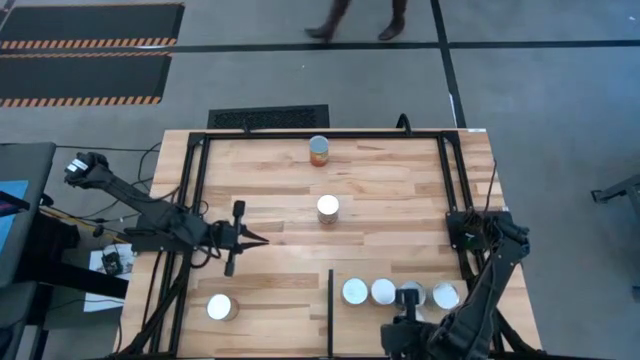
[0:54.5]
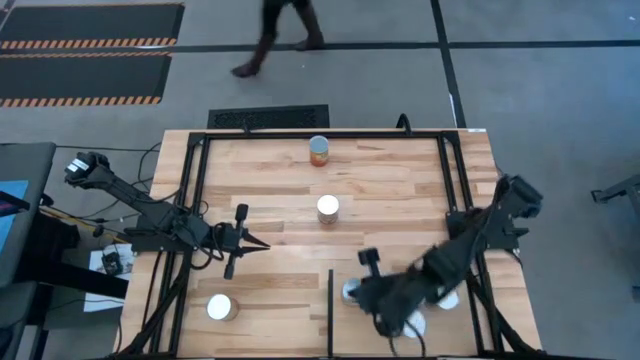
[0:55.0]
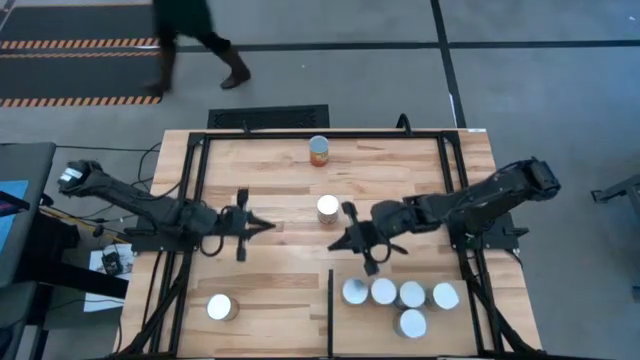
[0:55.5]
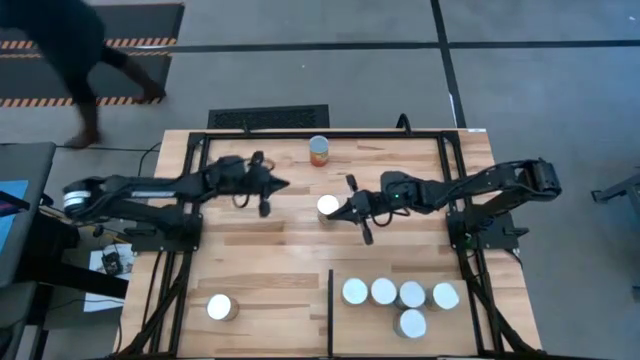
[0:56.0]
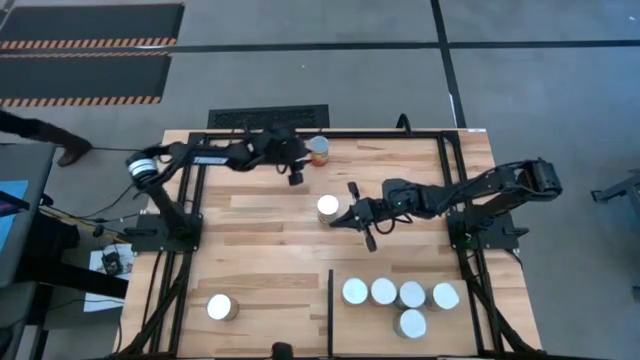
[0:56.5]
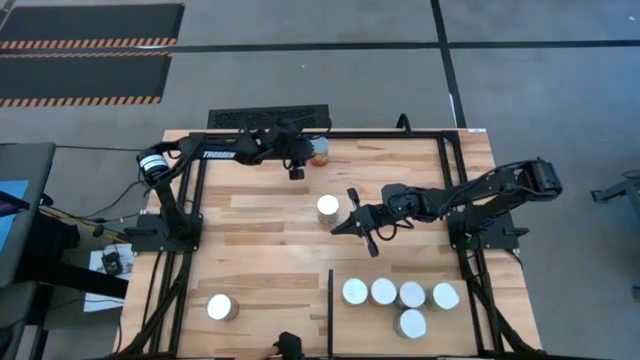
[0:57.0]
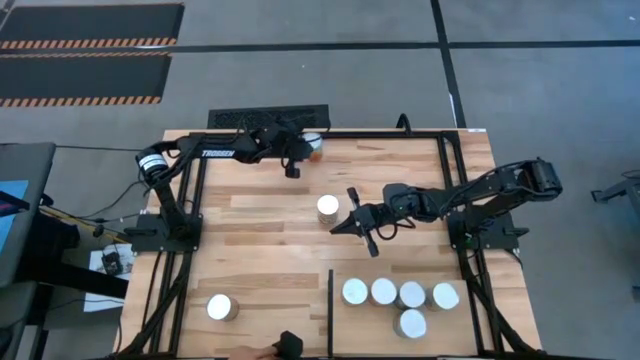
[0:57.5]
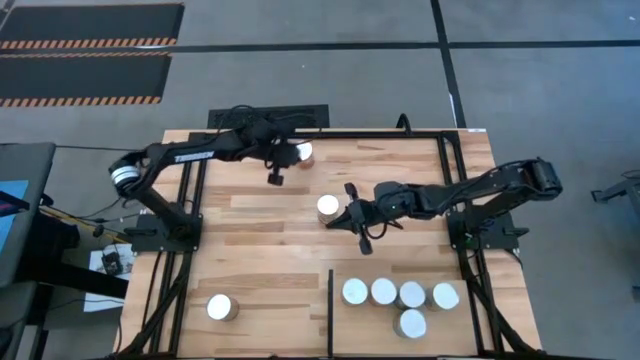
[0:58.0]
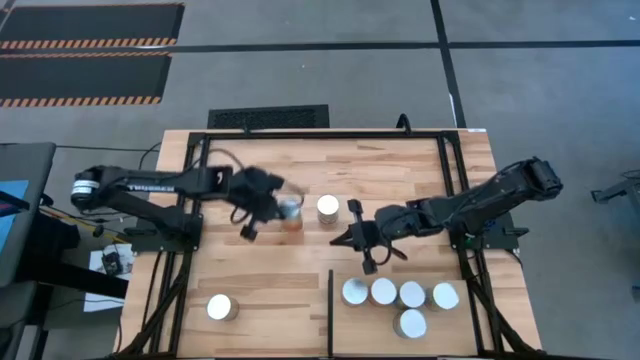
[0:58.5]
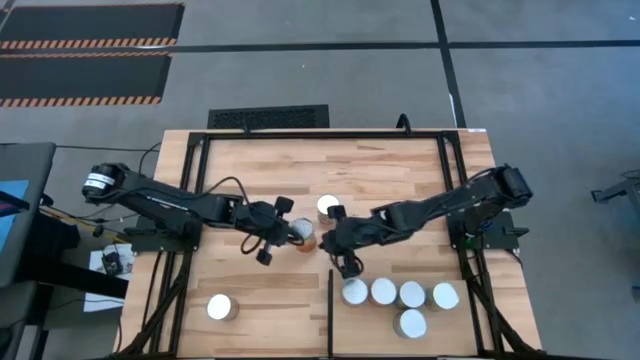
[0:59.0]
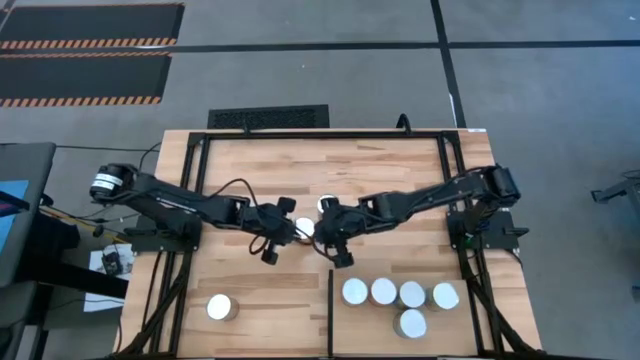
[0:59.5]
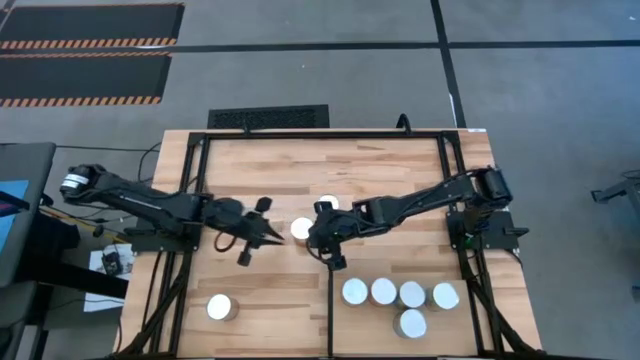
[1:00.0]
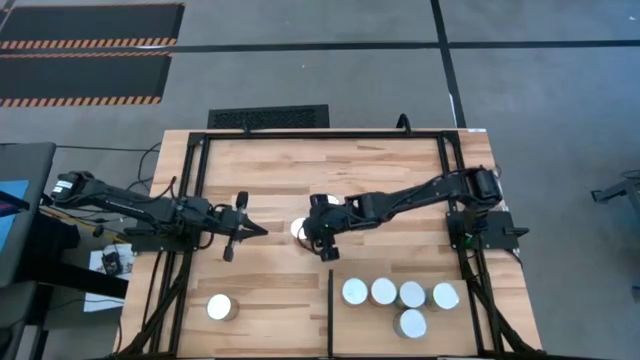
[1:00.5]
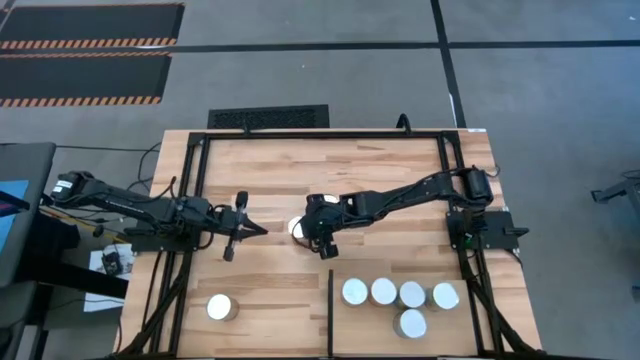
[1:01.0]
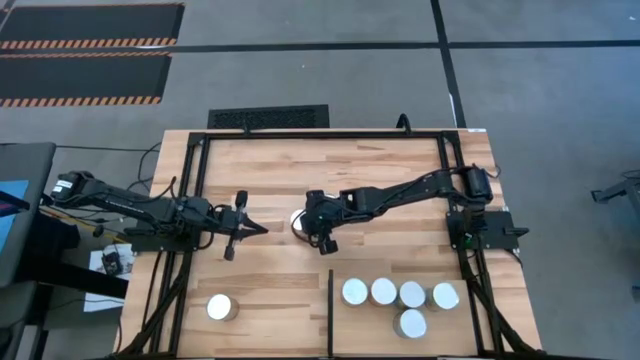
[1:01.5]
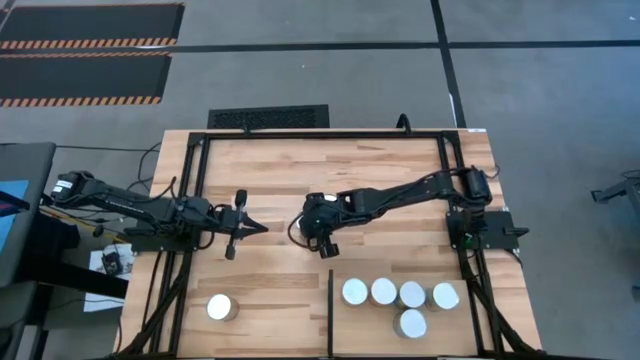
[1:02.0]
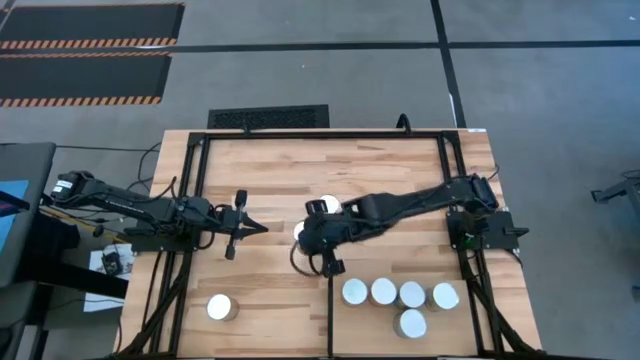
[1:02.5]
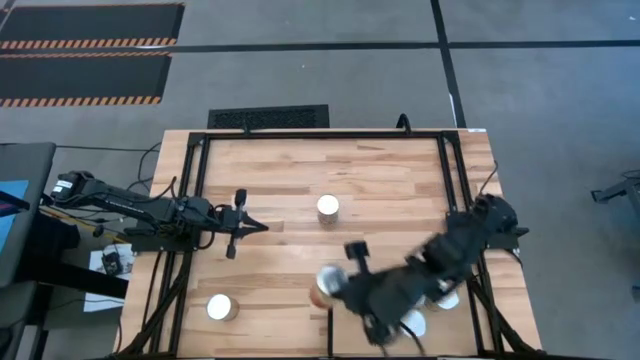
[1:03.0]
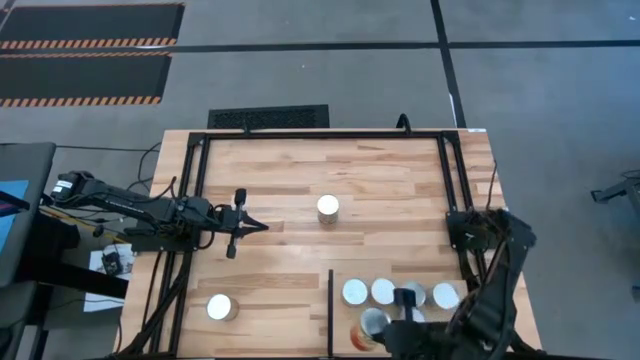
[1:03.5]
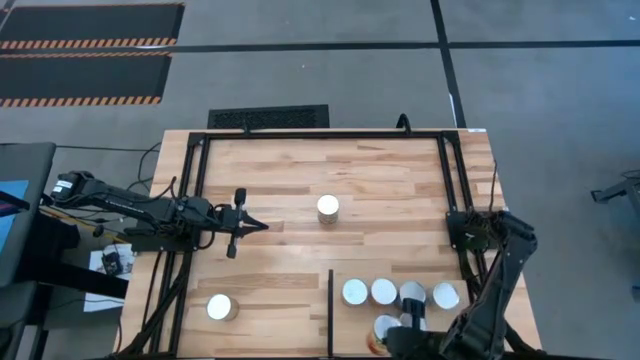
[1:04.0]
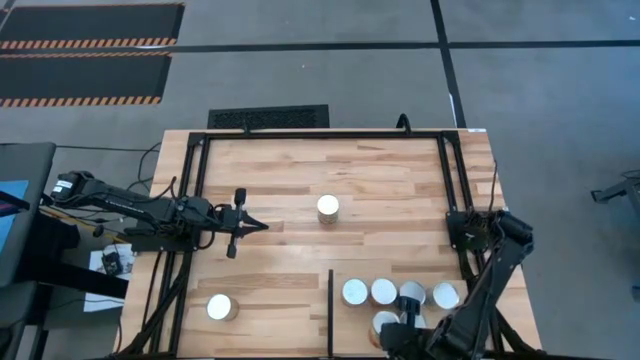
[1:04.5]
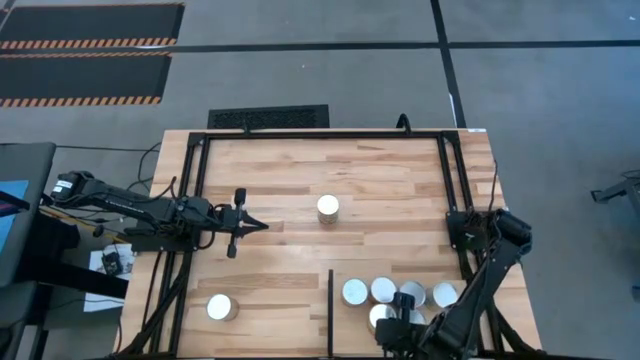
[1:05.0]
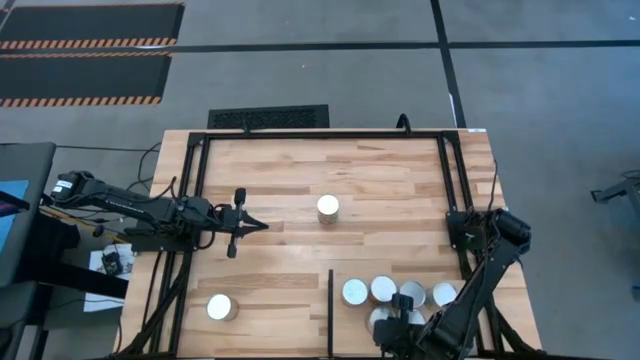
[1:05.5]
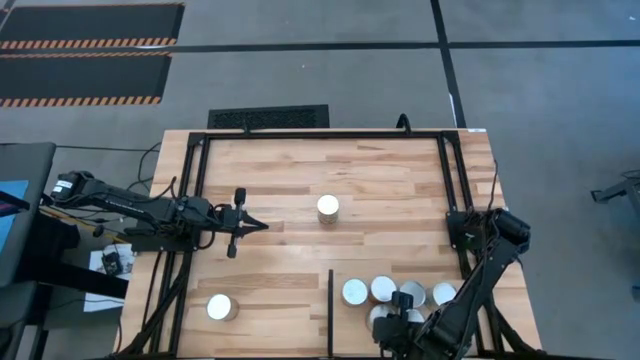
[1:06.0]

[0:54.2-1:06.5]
Task: Pick and place cans onto a shelf
Put the canned corn on the shelf aligned with the other canned corn

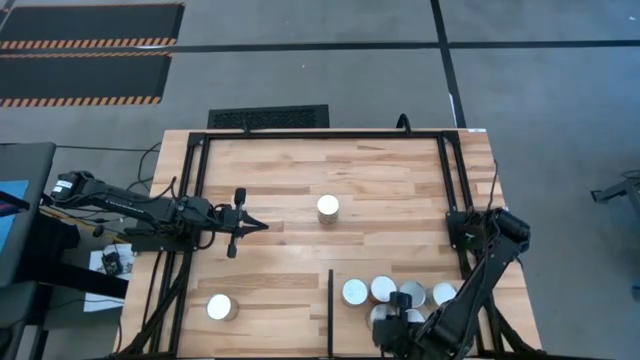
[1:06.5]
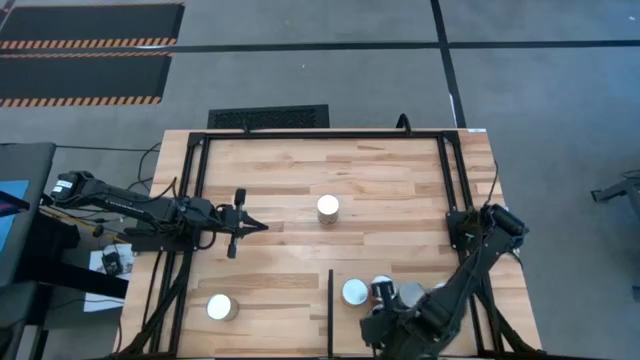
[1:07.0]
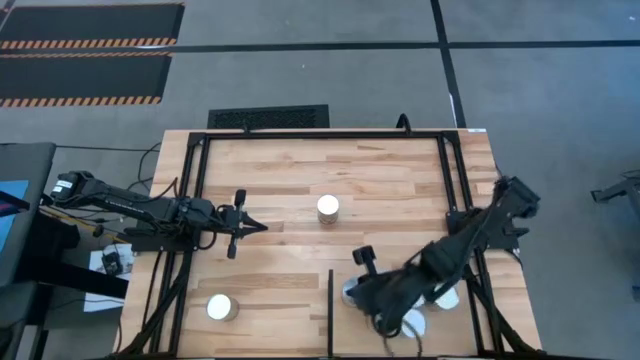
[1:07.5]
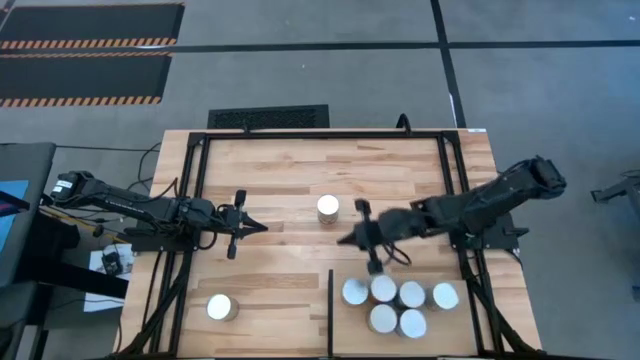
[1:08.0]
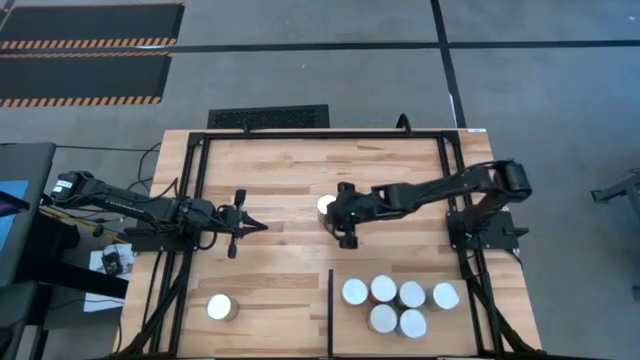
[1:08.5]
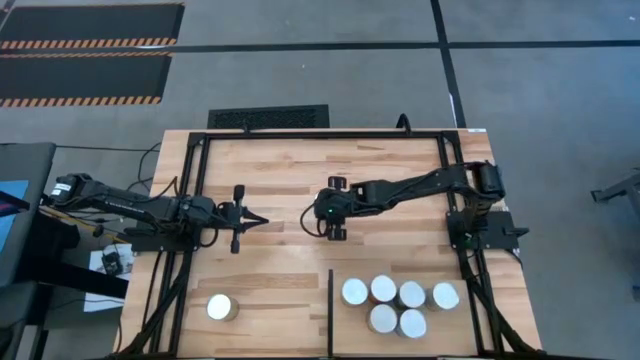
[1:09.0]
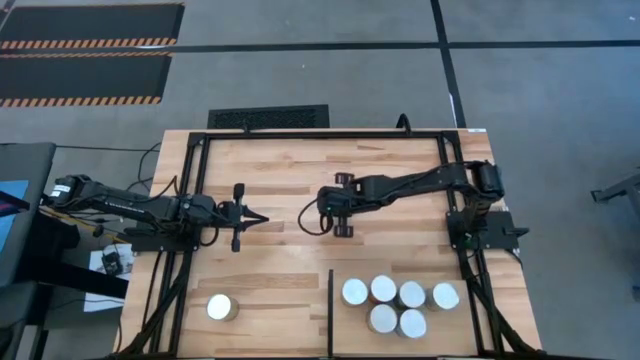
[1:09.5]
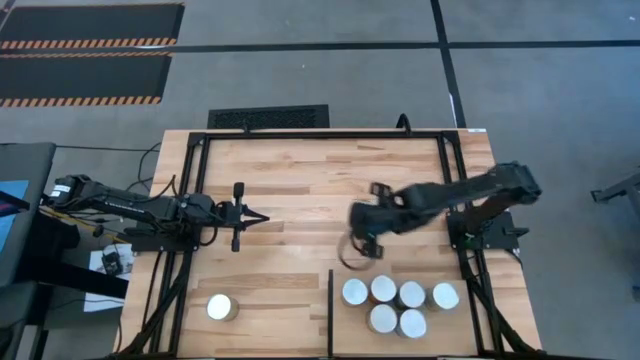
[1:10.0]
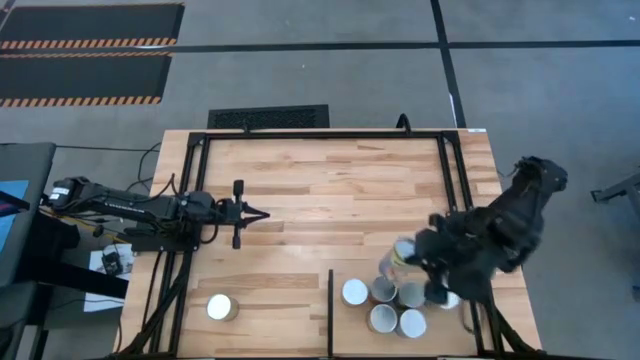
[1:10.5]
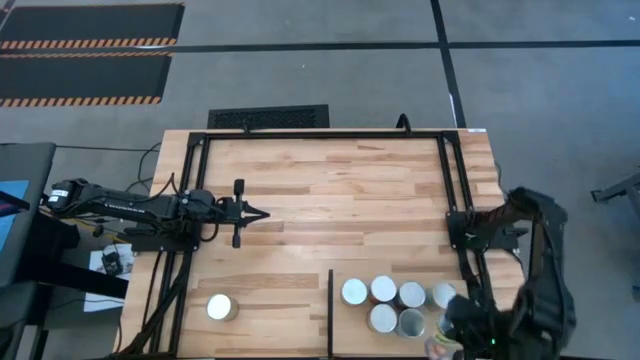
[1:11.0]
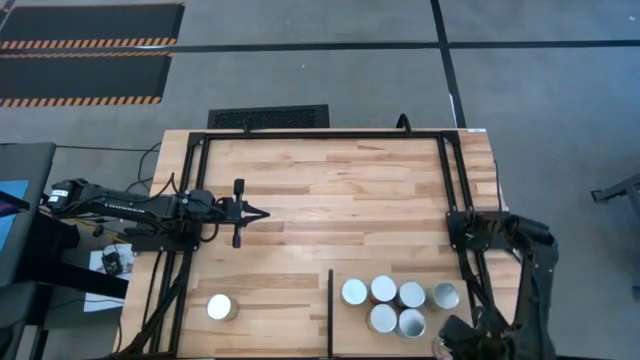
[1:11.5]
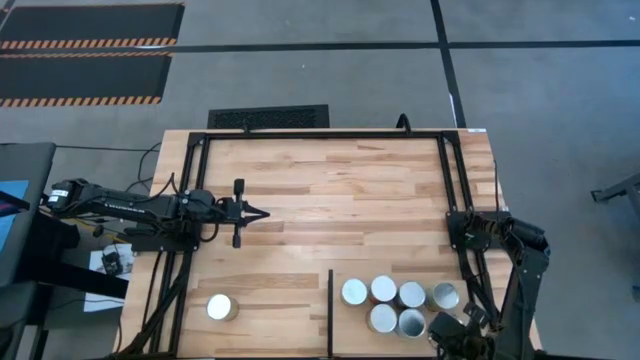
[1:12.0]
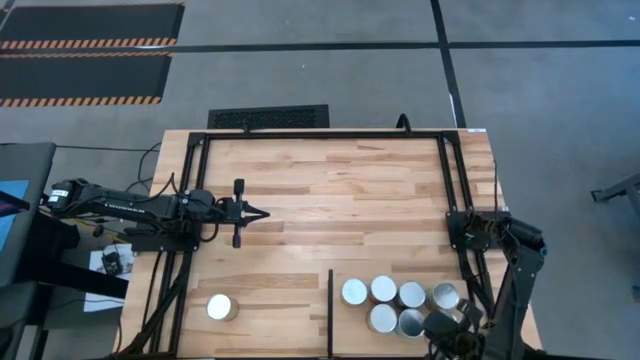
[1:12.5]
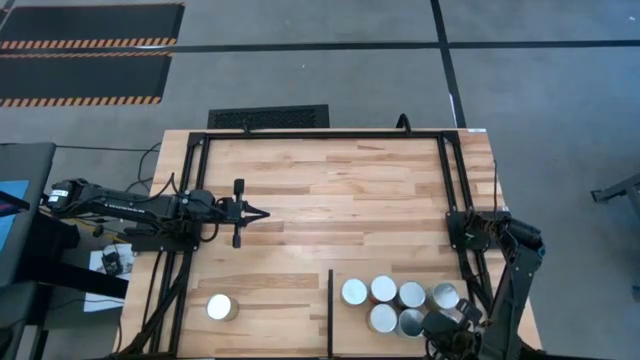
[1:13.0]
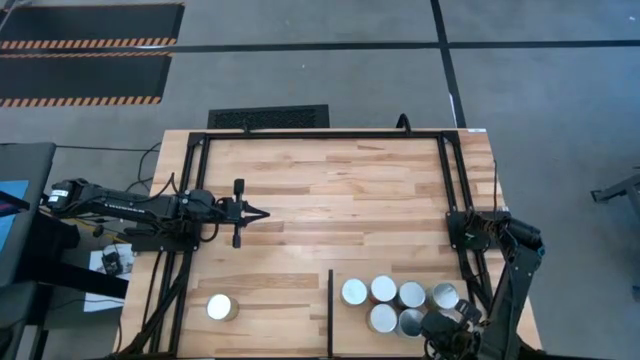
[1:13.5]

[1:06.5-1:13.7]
Put the canned peaches on the shelf aligned with the other canned peaches

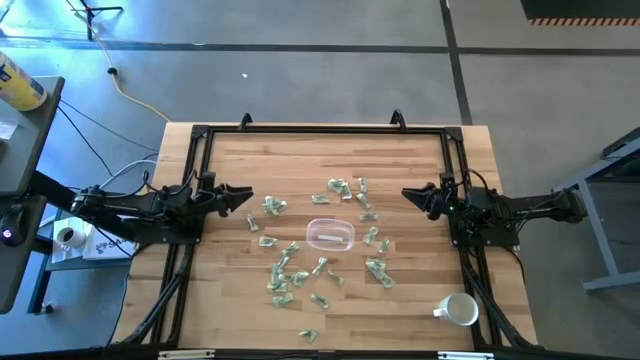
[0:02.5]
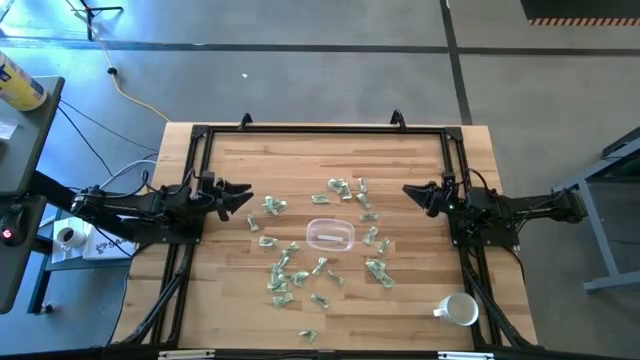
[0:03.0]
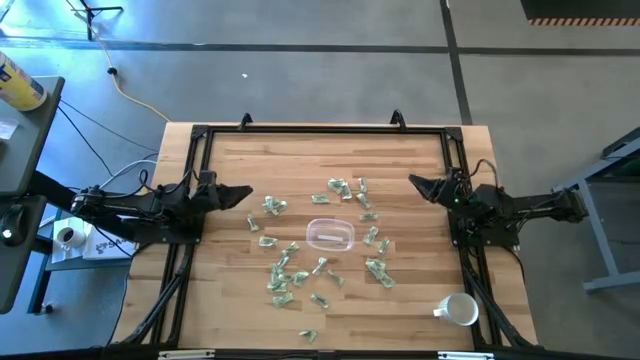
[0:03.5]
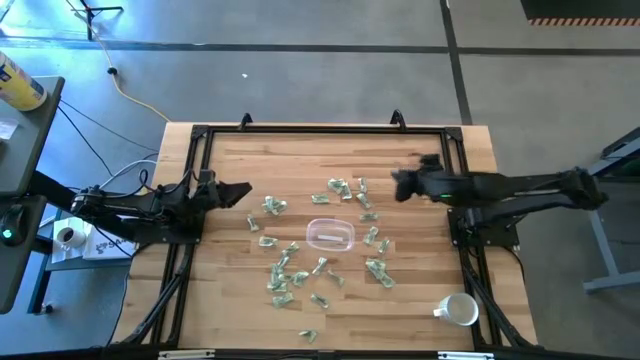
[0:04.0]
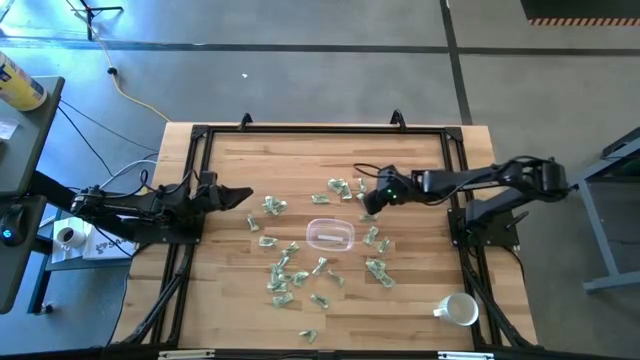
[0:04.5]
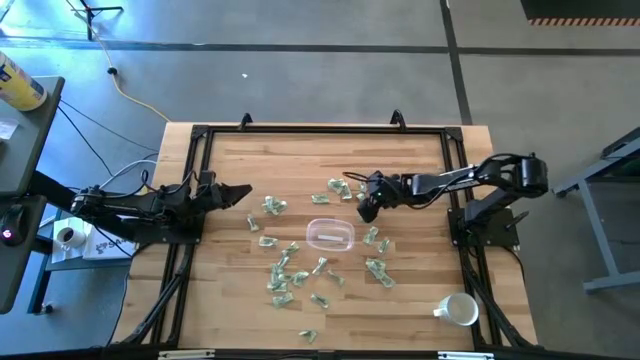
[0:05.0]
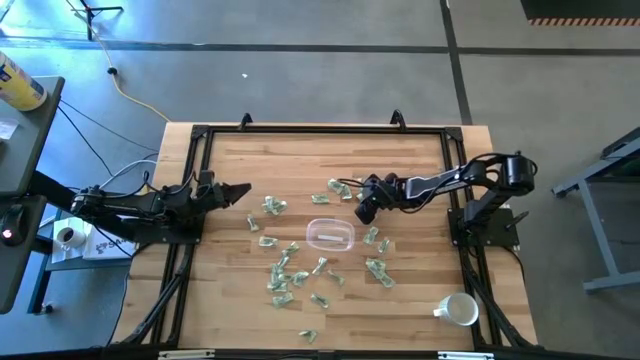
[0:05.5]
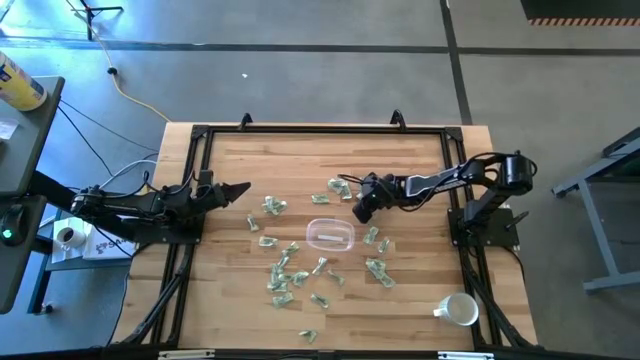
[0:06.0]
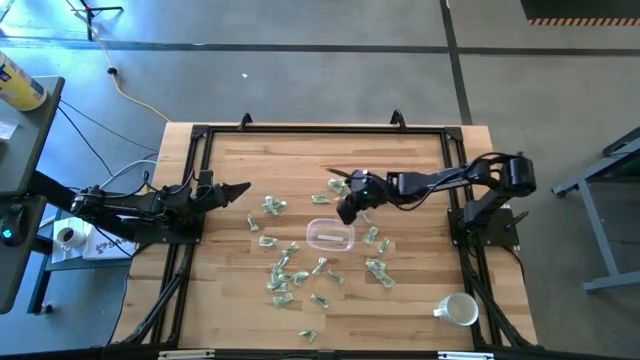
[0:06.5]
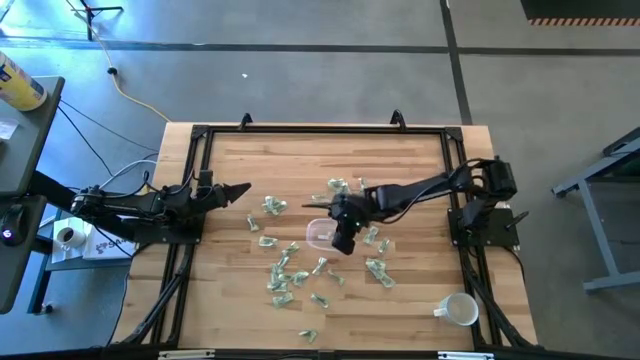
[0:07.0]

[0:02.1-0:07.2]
Task: Pick and place Stevia / Truvia into bins
Put the green stevia packet into the transparent container
